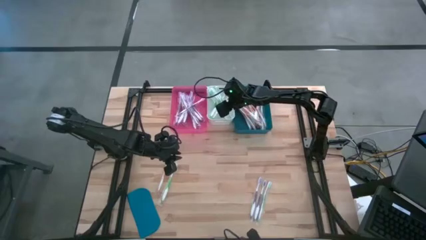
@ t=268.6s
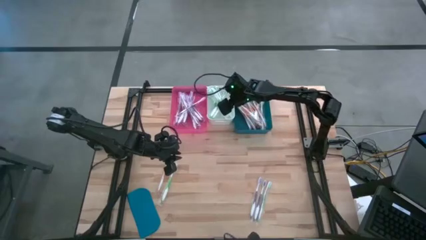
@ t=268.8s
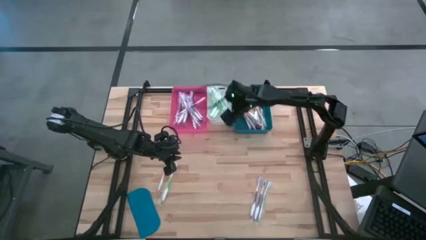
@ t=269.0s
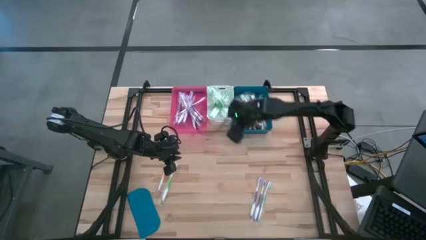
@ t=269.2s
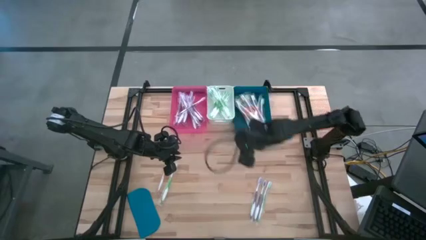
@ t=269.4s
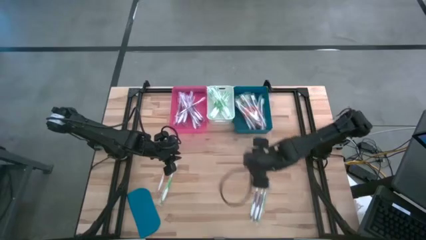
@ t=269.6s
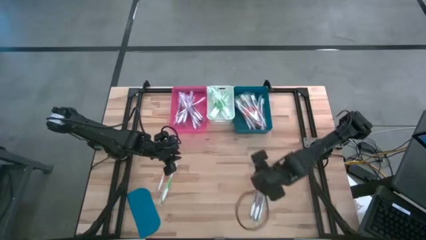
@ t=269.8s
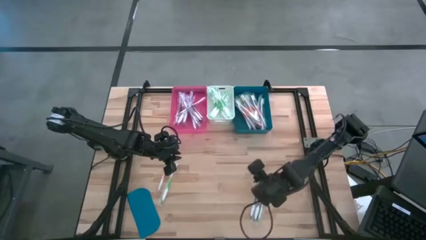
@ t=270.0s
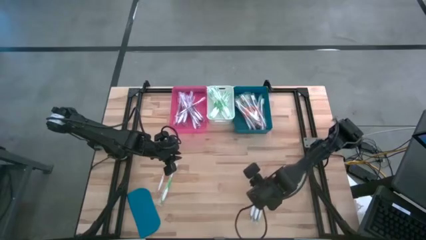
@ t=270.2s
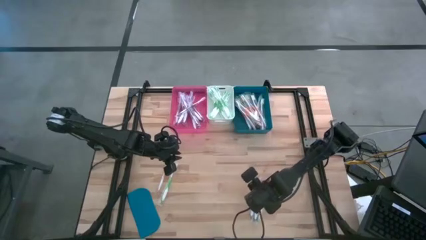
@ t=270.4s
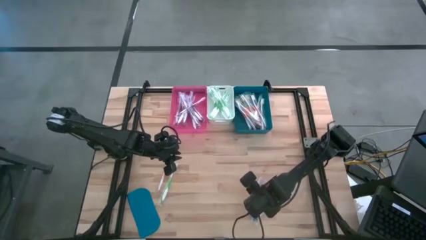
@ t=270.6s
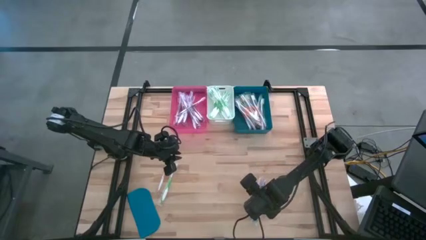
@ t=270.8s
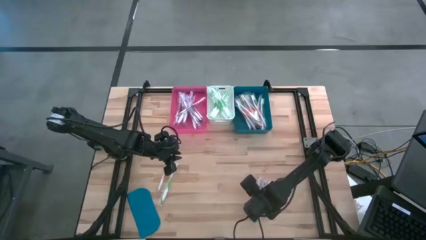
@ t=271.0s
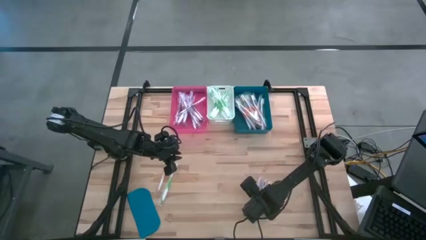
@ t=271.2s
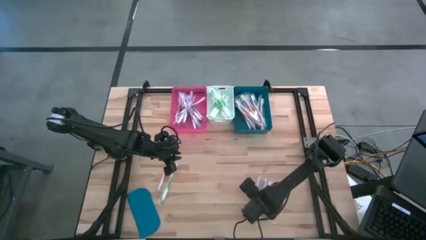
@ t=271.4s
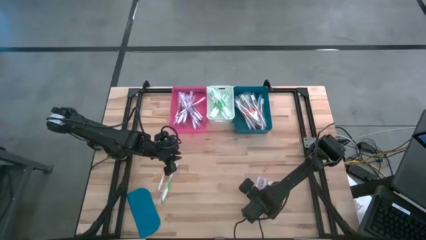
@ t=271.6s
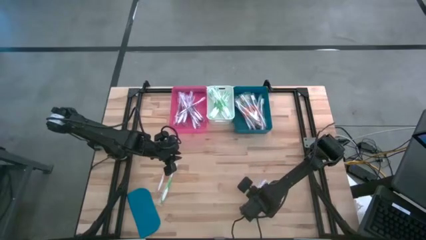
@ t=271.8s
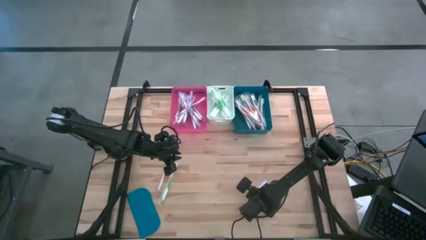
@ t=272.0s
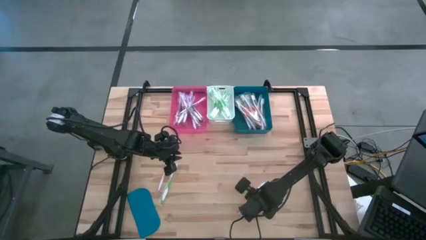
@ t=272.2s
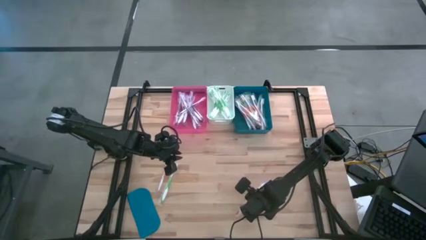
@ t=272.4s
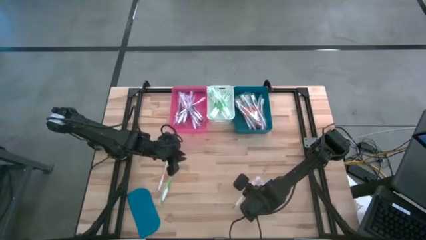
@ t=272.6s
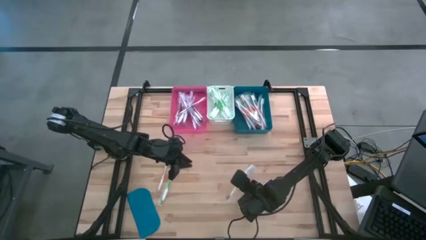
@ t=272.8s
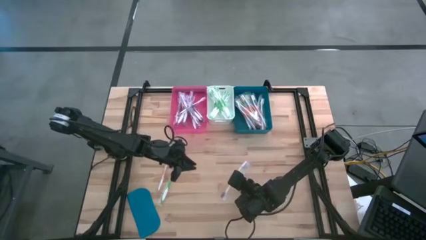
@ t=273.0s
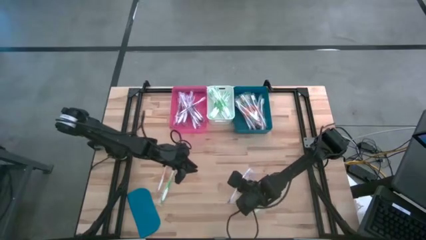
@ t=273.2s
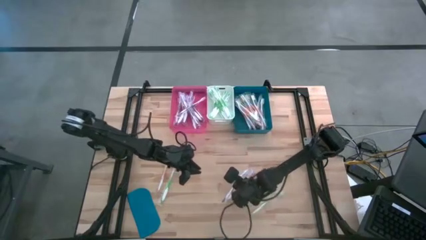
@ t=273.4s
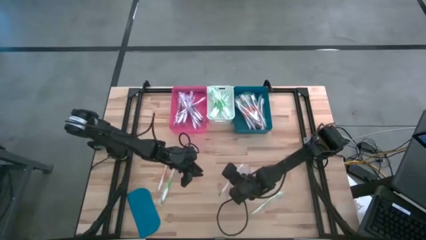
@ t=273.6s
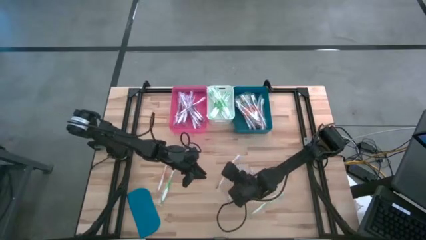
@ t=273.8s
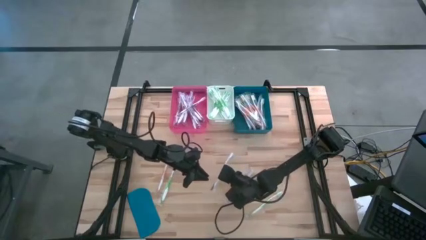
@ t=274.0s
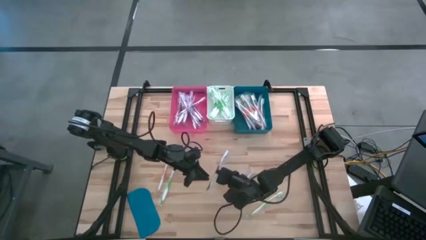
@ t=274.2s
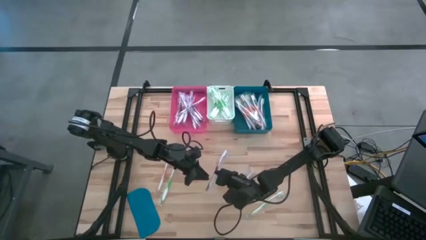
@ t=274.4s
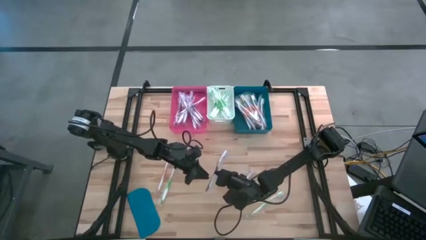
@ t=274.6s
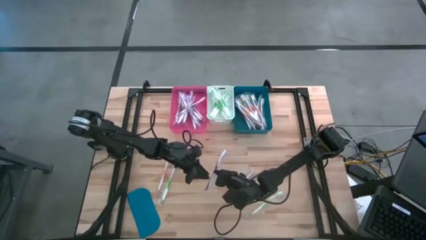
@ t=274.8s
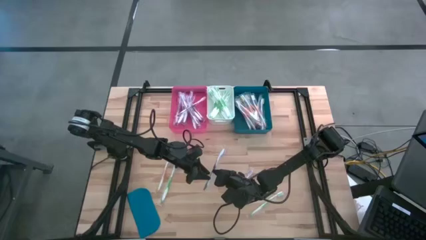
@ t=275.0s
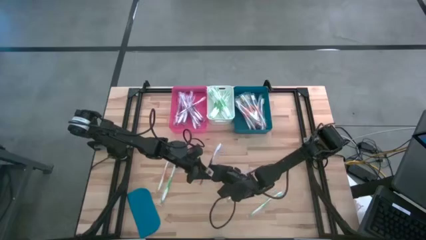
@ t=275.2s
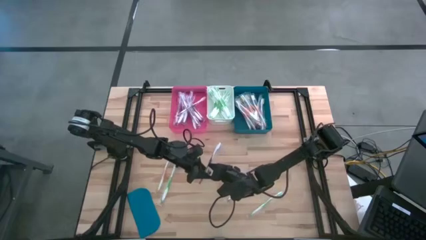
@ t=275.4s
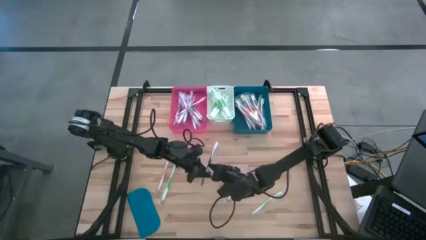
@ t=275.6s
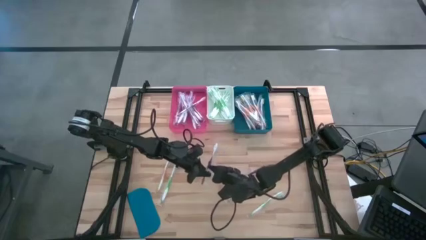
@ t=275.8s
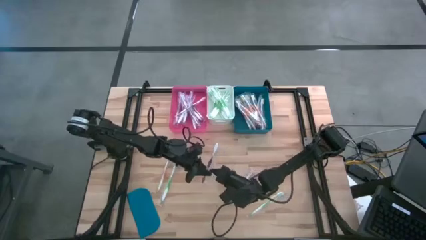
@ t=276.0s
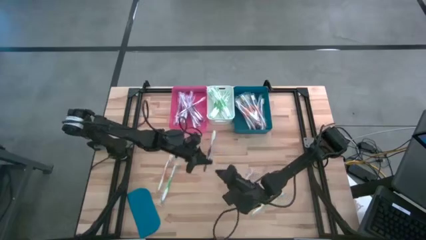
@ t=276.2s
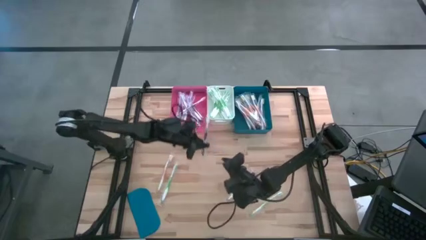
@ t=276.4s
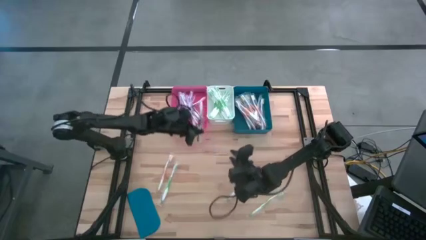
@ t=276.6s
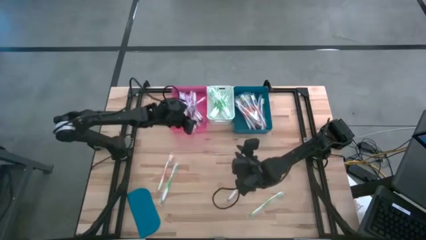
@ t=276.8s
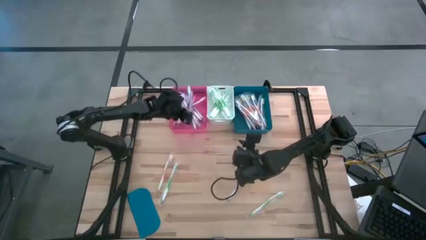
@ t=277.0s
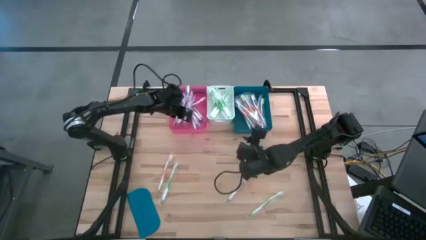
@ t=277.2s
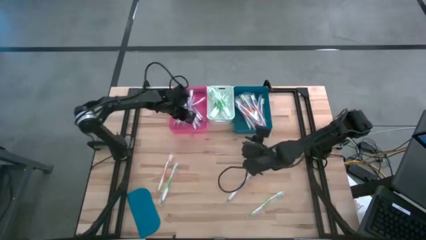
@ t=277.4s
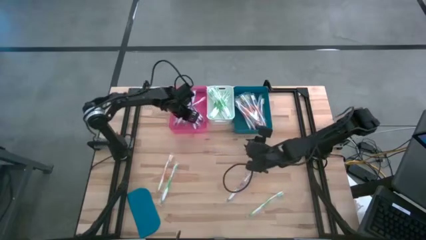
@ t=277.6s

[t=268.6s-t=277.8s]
Task: Pick & Place Toothbrushes
Put the violet toothbrush into the pink bin

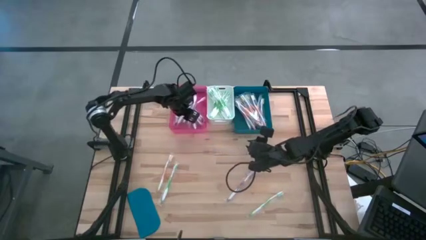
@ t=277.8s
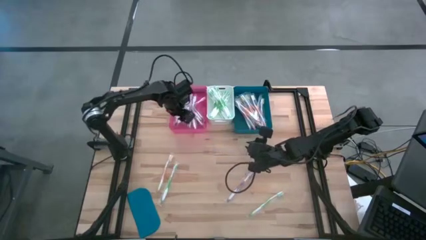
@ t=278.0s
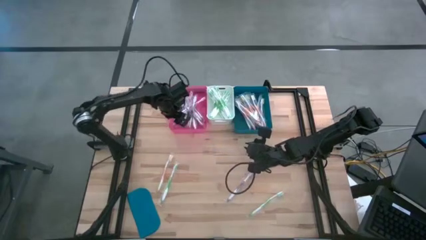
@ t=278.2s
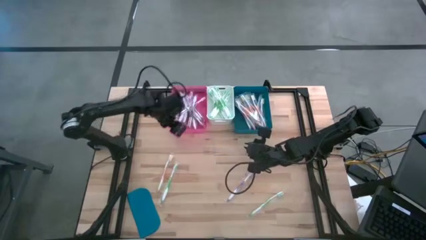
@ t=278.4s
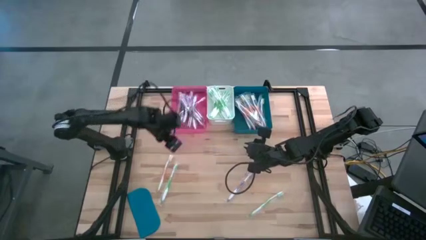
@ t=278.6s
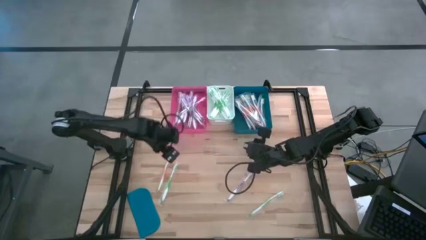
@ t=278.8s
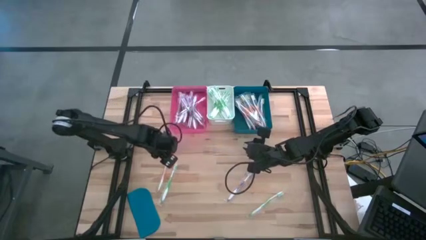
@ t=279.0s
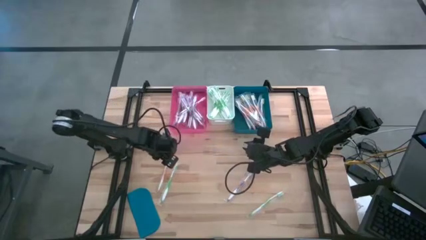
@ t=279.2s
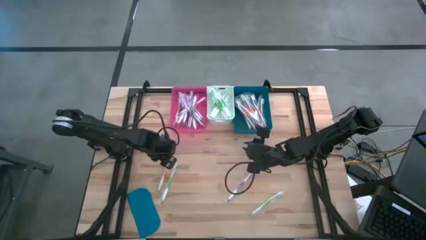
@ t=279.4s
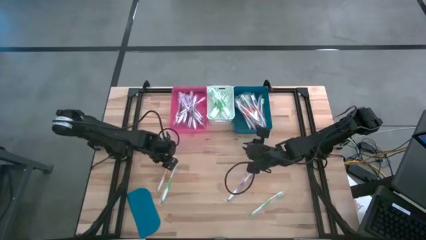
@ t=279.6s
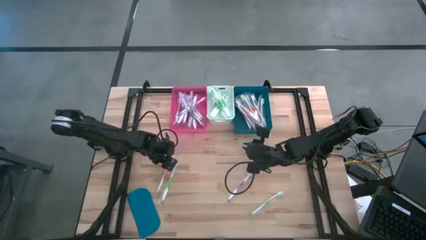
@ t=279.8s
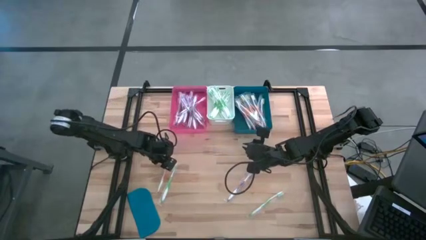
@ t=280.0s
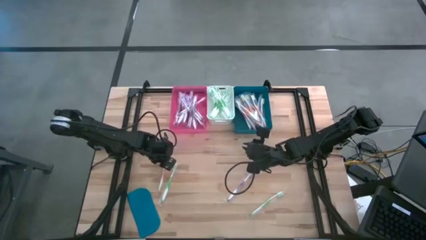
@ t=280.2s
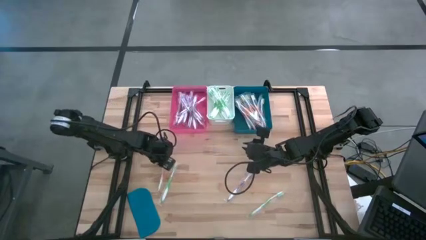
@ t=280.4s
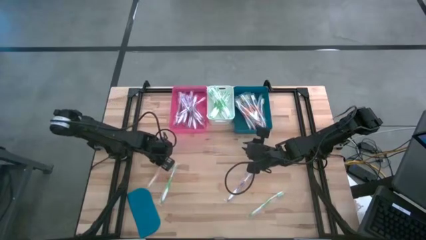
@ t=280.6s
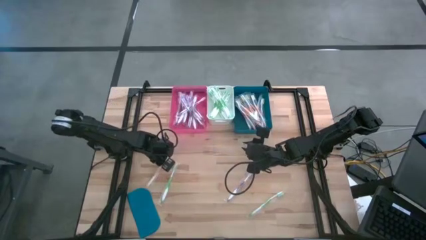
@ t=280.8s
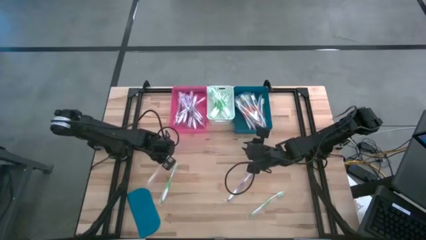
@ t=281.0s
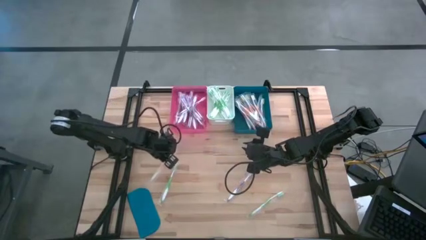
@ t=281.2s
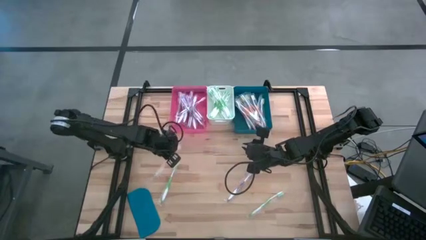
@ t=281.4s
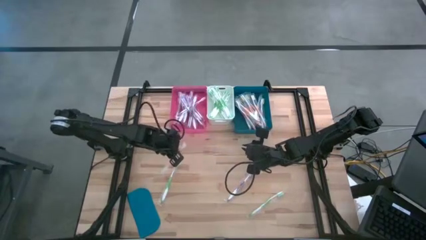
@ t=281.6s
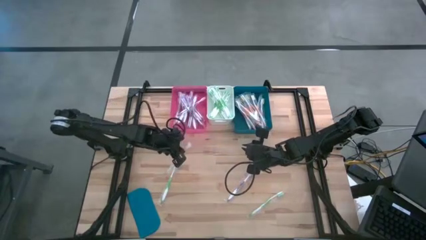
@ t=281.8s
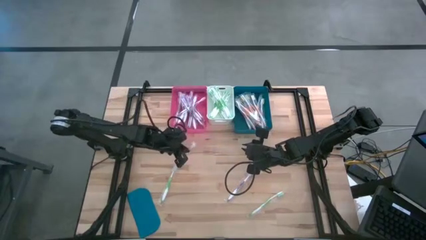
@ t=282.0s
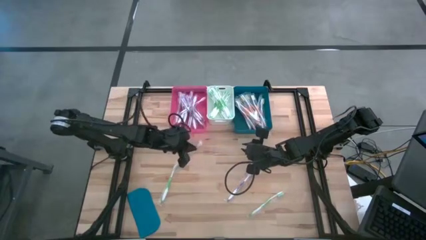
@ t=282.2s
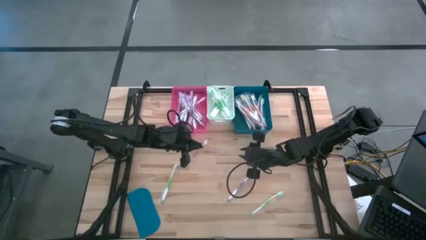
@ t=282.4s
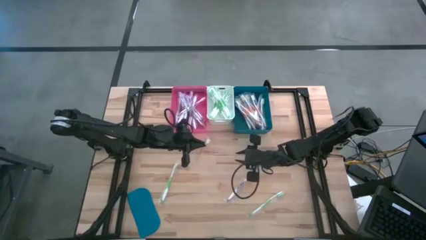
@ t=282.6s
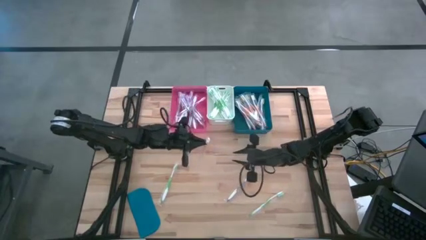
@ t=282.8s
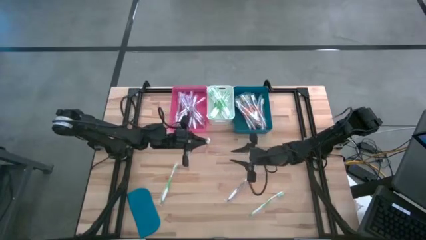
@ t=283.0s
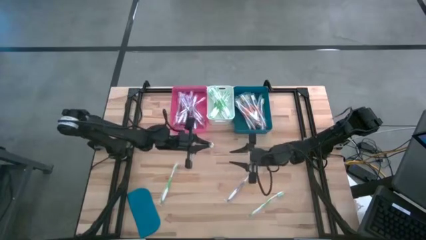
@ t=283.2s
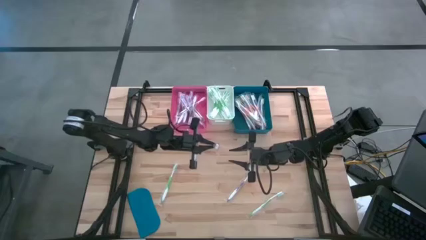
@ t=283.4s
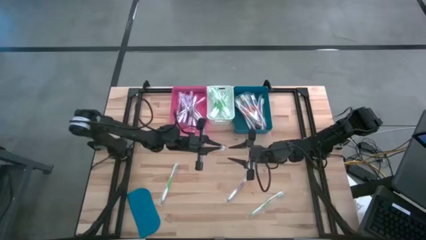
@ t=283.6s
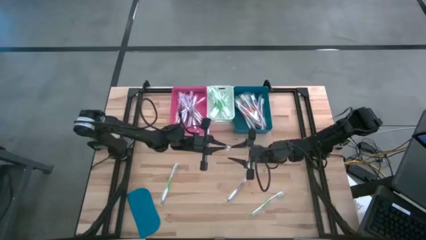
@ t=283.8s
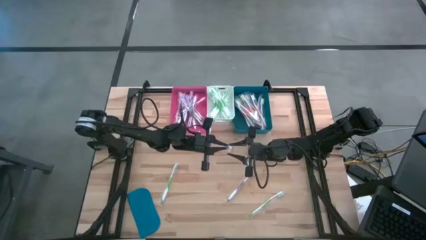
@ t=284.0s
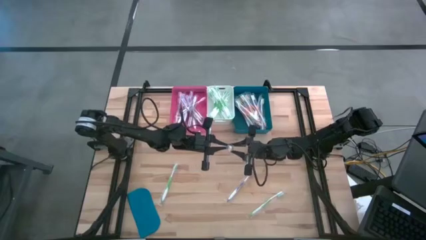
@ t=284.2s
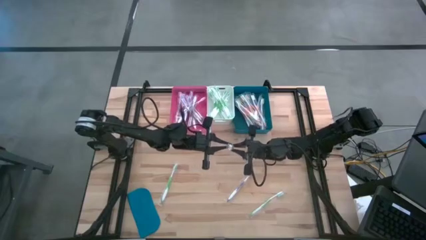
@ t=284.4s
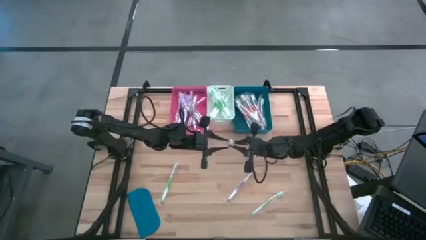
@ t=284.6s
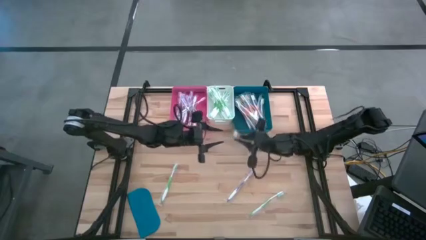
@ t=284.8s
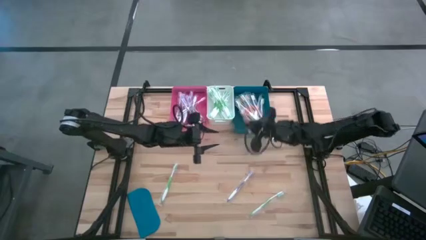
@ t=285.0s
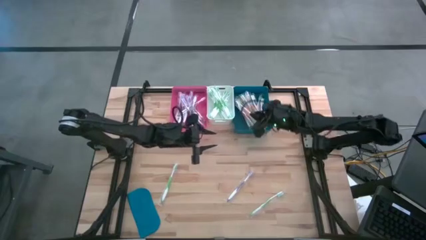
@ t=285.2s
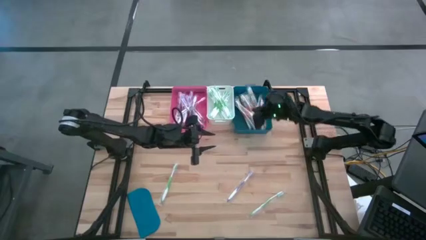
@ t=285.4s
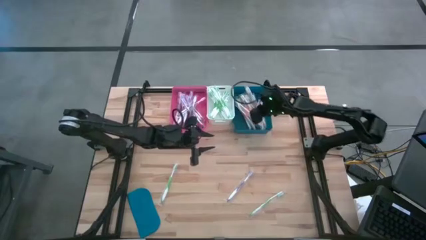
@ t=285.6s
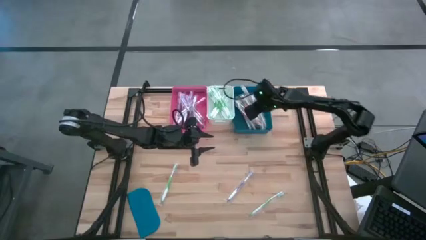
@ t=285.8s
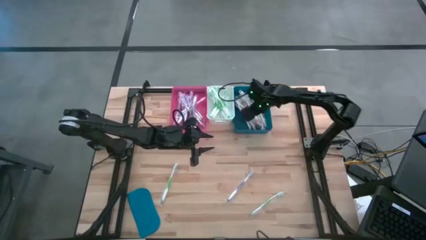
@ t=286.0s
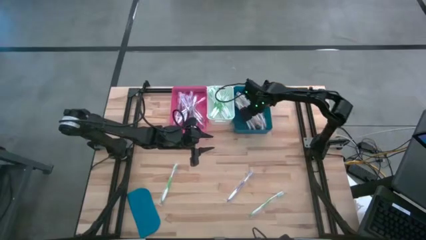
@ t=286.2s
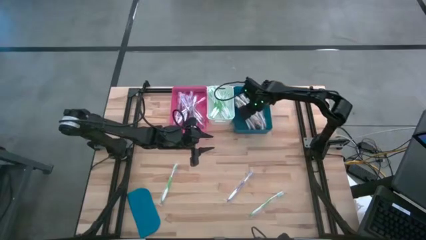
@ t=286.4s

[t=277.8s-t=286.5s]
Put the orange toothbrush into the blue bin
